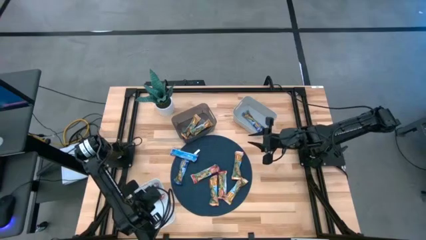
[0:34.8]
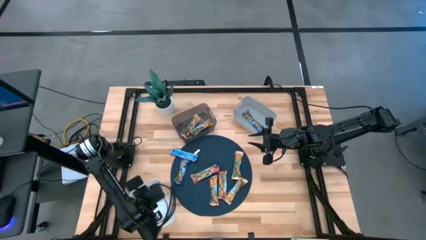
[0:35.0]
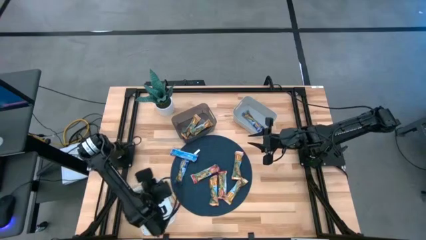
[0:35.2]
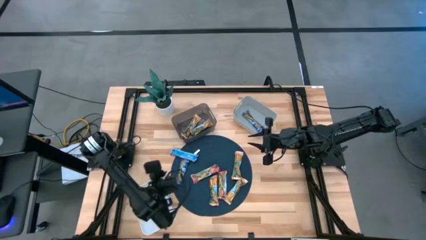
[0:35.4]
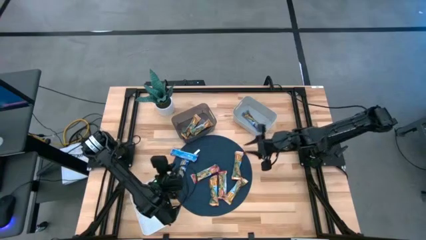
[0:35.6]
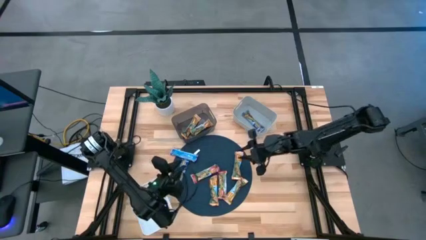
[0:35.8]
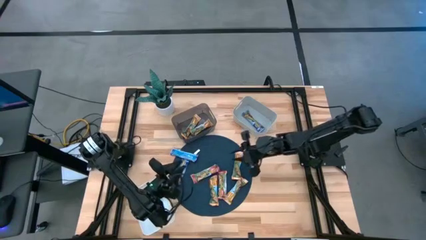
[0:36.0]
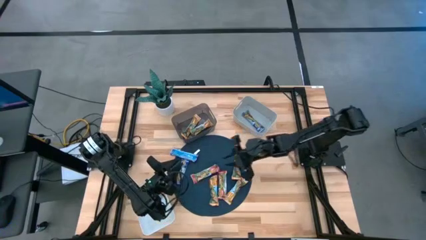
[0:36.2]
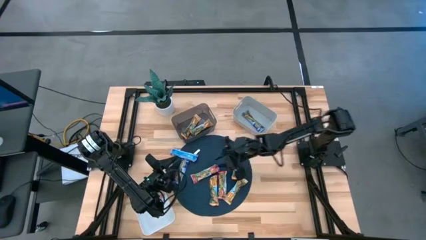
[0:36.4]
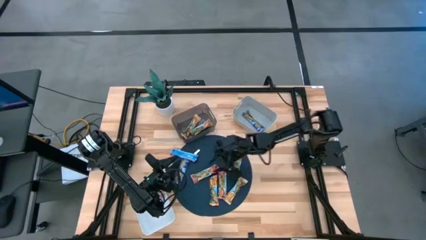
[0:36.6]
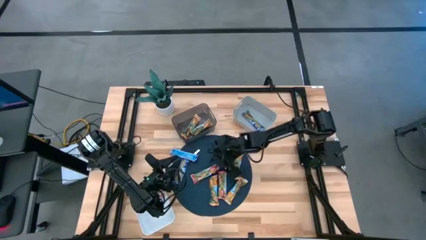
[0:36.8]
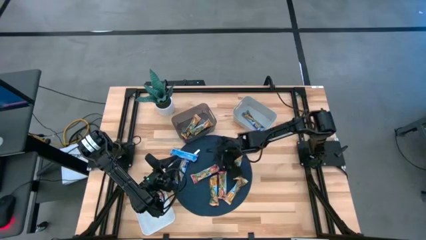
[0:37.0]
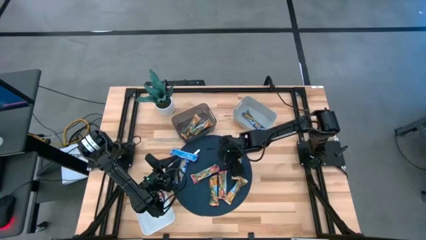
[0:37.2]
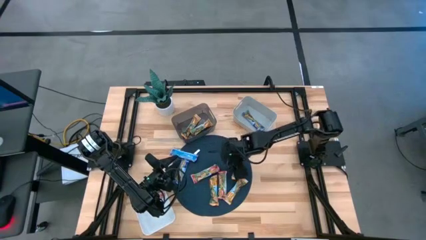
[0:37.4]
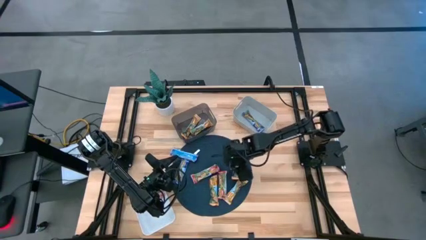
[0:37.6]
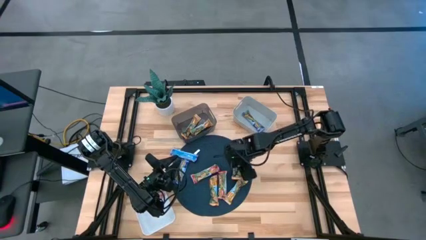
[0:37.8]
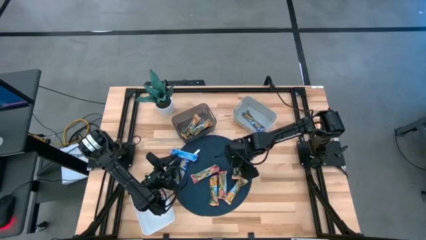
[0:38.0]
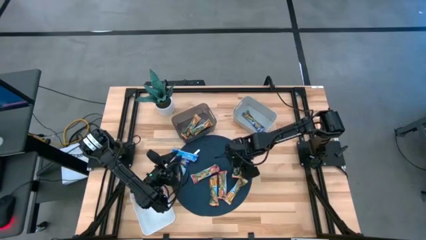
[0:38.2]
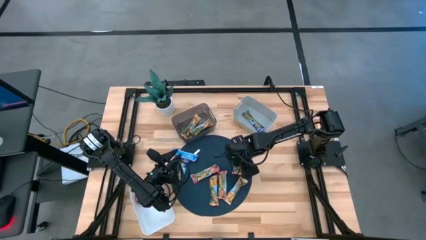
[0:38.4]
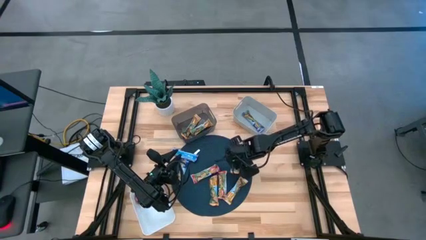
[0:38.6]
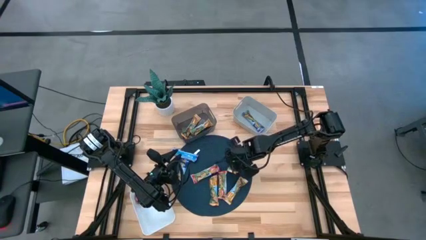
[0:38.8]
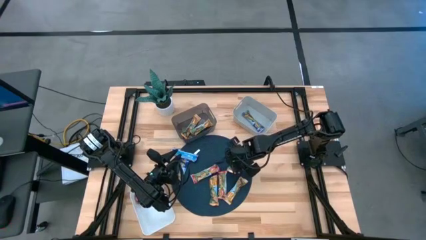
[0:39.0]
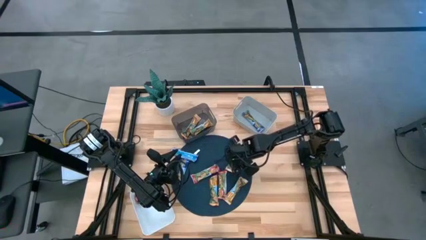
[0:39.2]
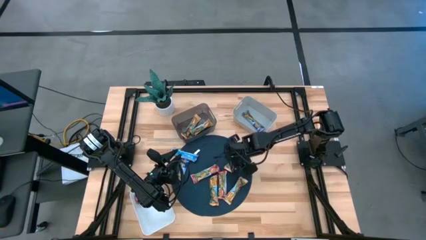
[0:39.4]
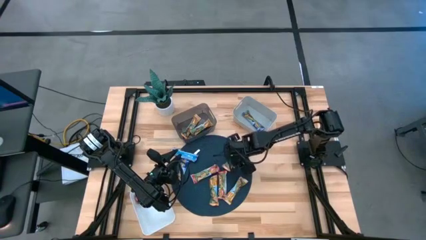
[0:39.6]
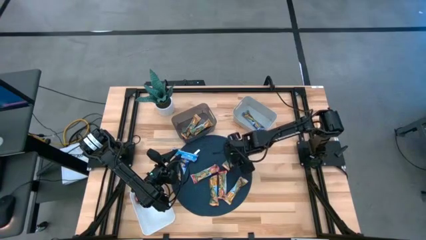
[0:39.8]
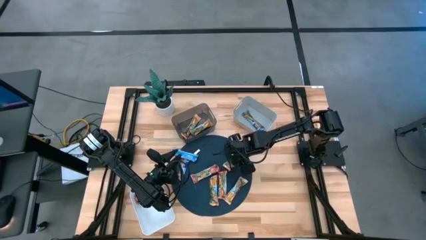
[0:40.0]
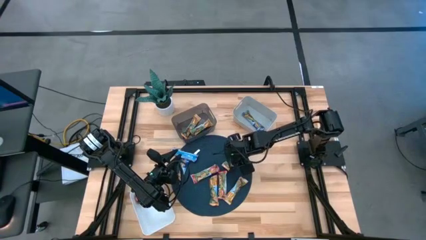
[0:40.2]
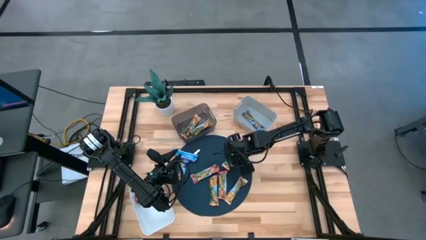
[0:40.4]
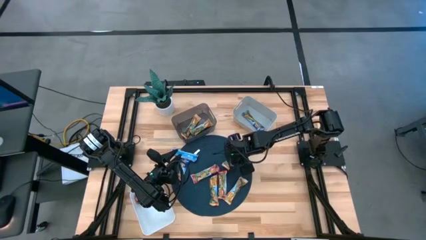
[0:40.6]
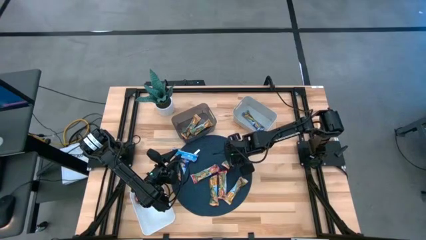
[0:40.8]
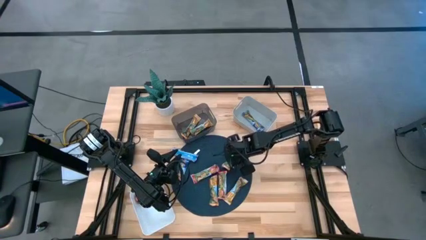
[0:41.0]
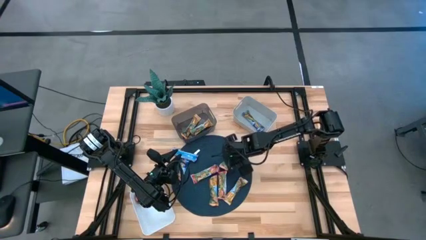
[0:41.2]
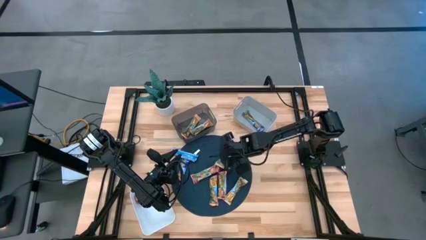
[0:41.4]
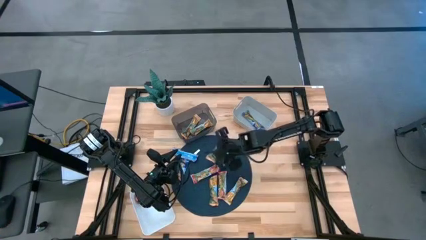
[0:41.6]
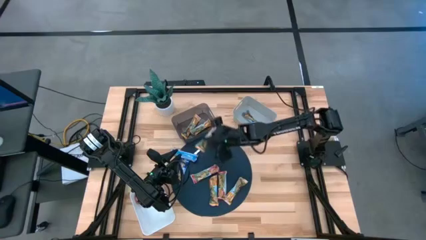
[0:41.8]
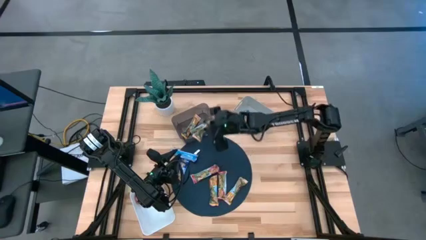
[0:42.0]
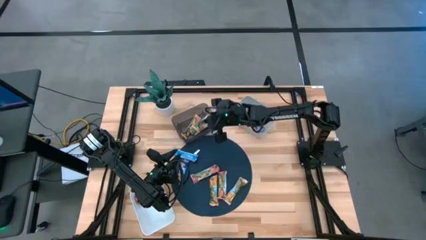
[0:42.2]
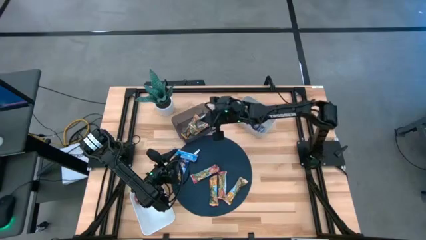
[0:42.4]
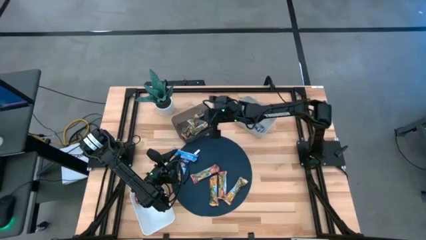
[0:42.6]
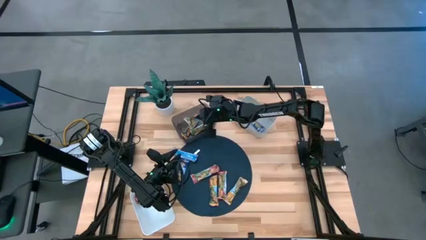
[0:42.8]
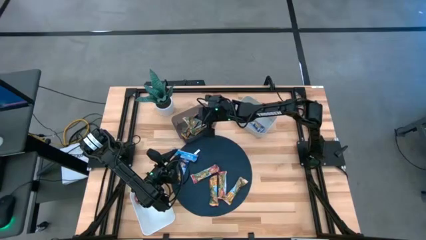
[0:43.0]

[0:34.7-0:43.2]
Task: Pick and place Granola Bars by type
Put the yellow granola bar into the black bin

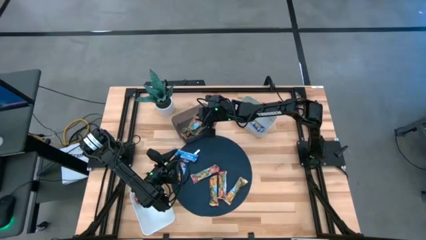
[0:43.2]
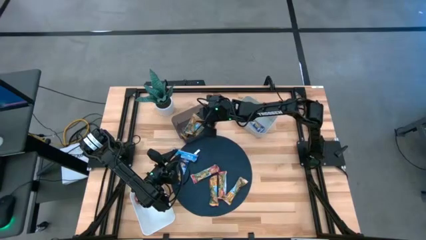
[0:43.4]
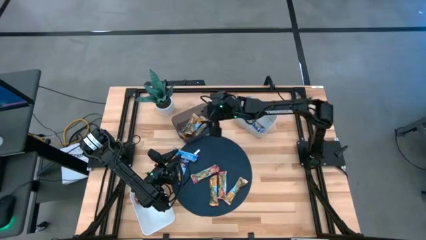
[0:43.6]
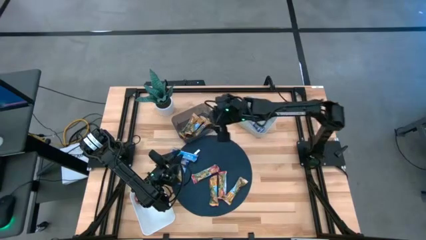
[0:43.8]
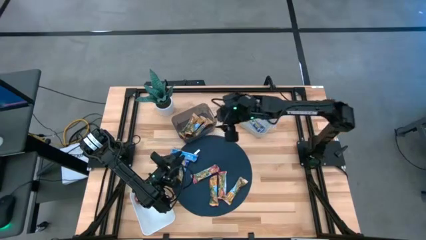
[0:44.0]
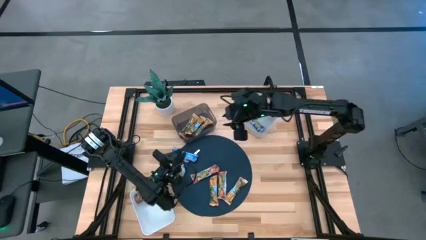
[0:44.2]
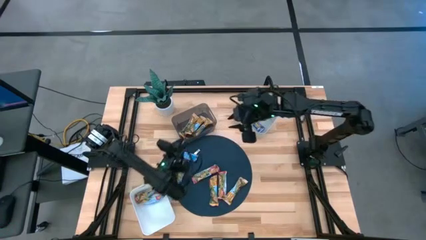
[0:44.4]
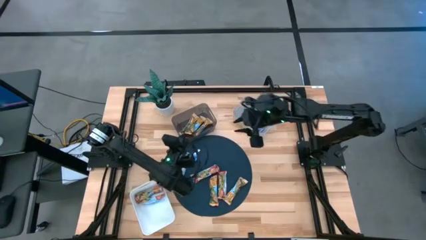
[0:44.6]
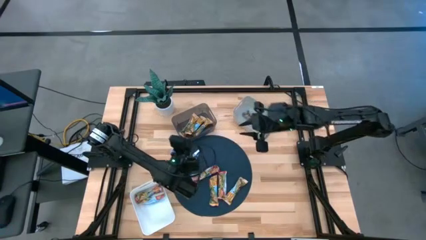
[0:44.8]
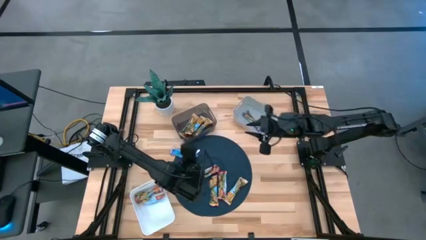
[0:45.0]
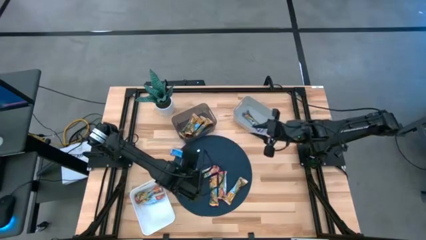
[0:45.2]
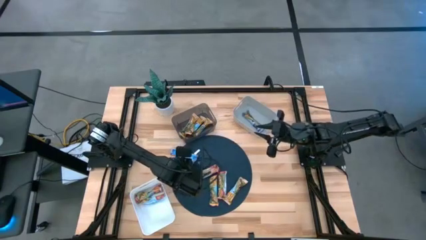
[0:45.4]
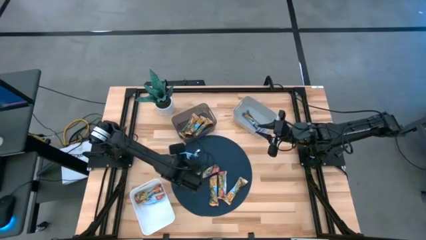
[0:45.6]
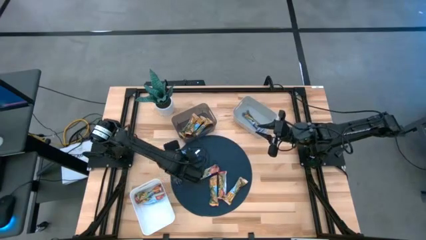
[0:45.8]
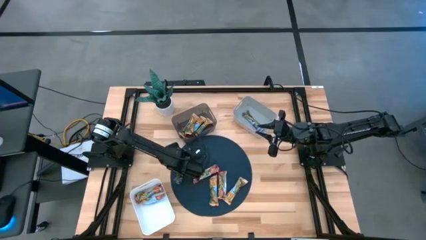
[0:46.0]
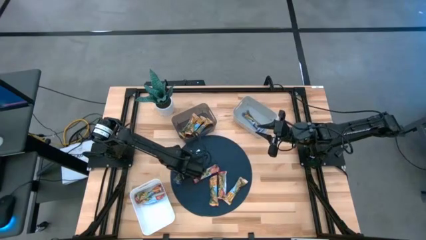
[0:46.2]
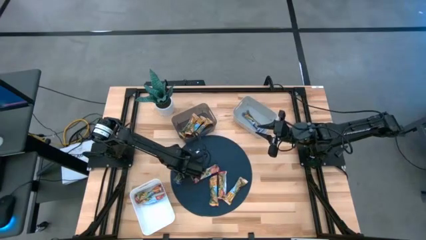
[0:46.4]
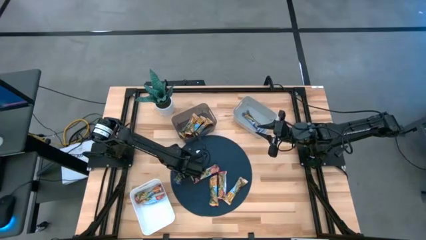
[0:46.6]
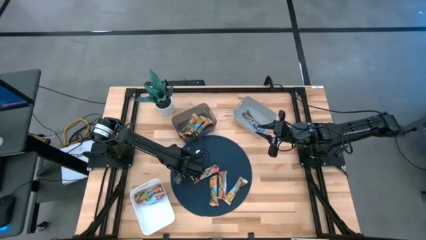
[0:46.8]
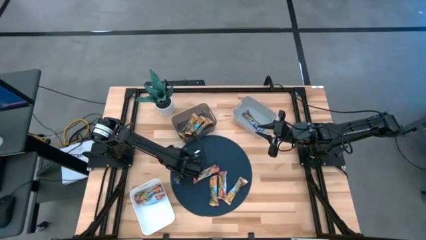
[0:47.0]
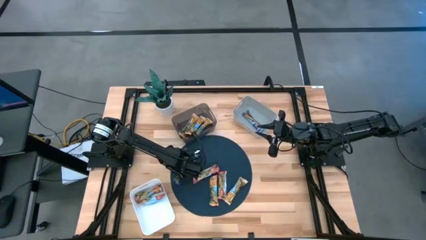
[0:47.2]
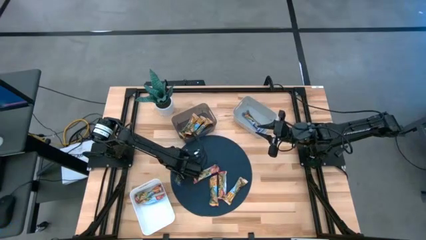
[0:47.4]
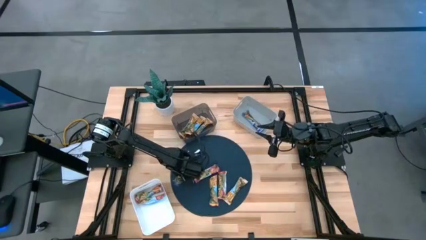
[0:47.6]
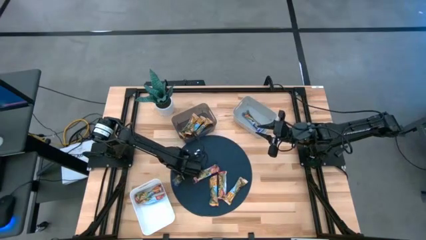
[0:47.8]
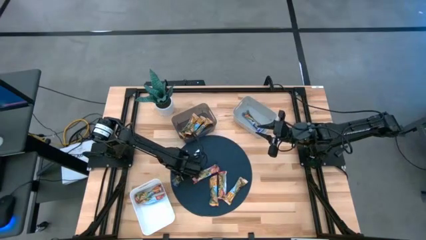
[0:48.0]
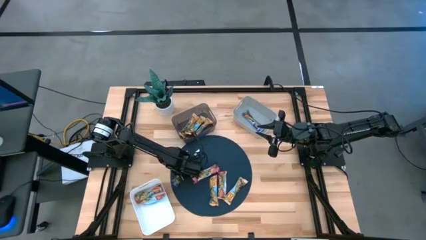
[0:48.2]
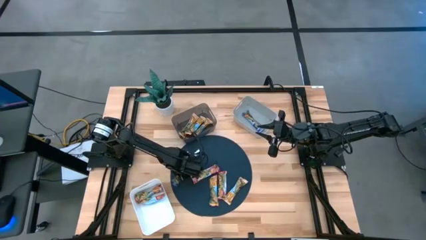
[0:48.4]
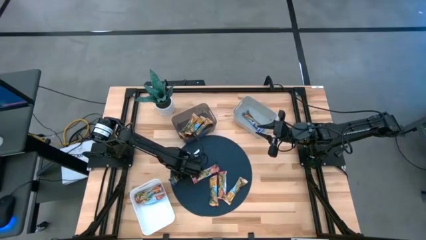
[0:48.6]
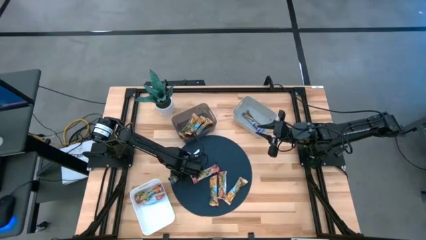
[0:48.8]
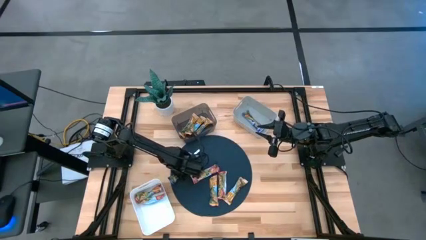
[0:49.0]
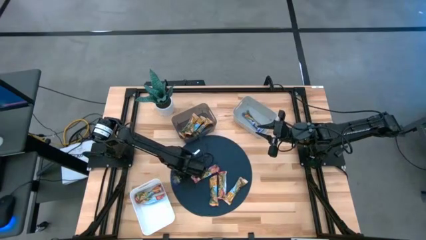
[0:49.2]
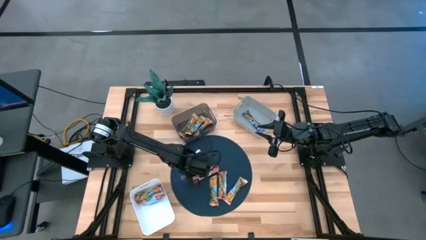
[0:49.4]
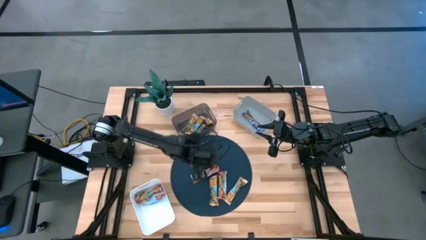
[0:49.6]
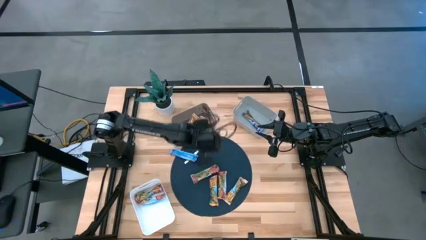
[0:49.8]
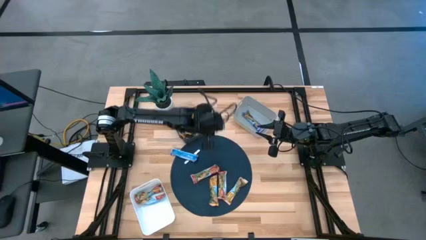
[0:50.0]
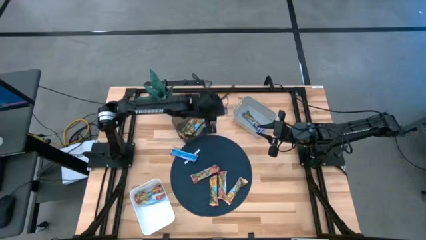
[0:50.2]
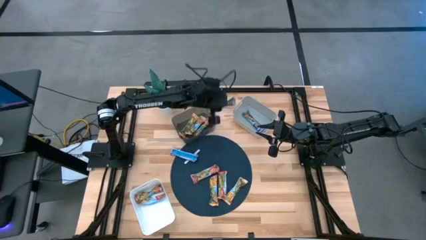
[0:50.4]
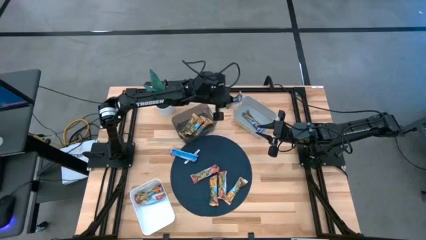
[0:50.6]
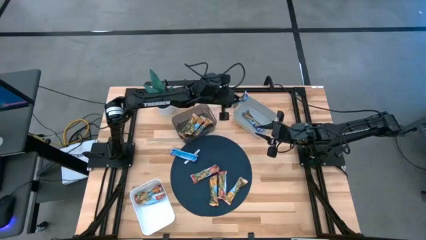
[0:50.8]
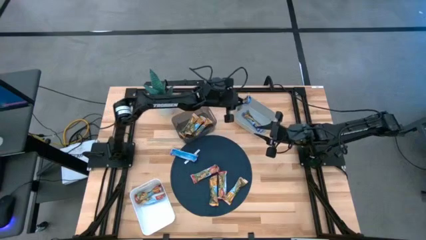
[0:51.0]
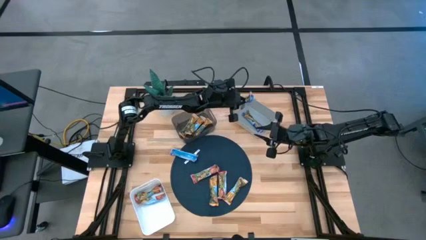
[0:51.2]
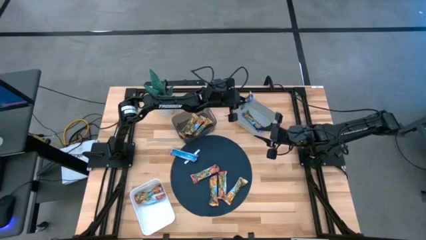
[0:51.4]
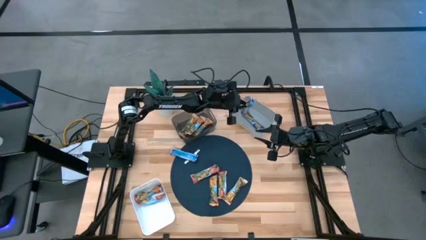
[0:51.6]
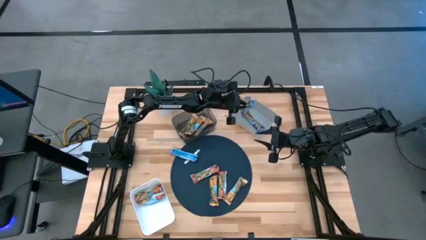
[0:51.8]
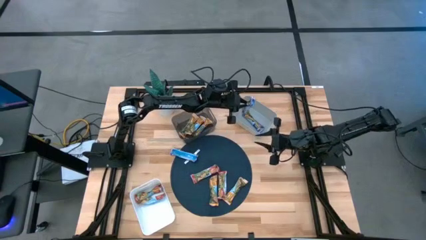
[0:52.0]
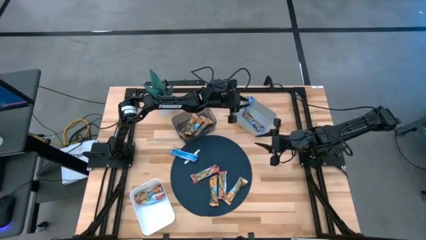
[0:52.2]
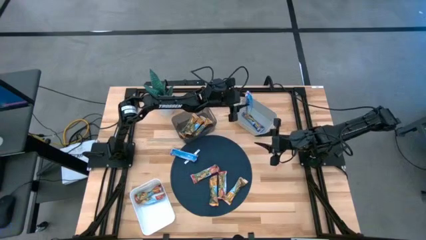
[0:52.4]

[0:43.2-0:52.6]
Put the blue granola bar into the gray bin
